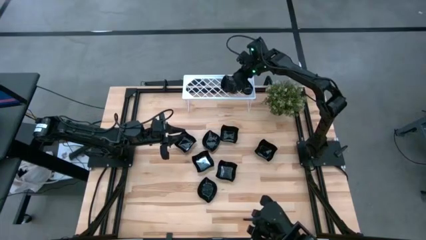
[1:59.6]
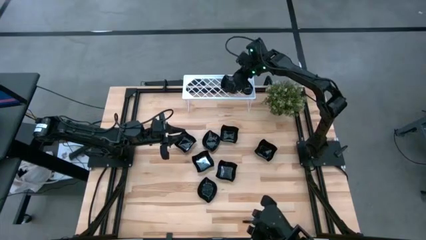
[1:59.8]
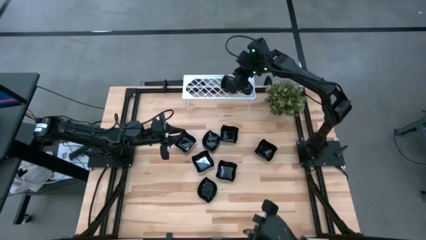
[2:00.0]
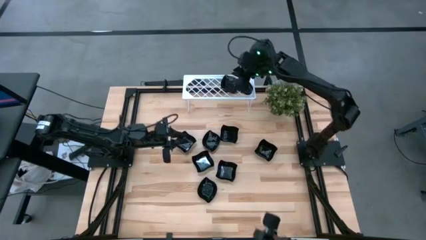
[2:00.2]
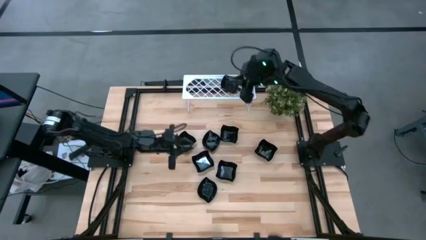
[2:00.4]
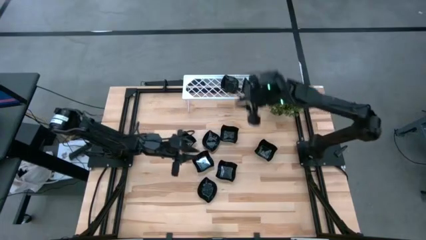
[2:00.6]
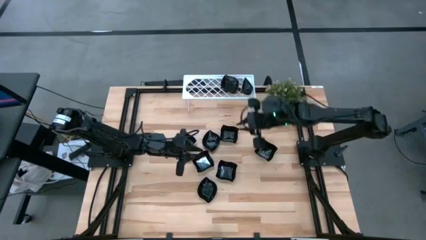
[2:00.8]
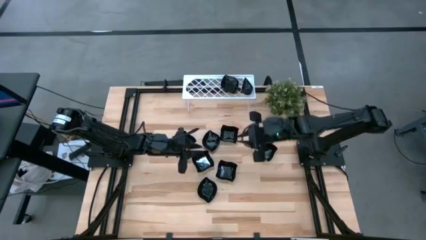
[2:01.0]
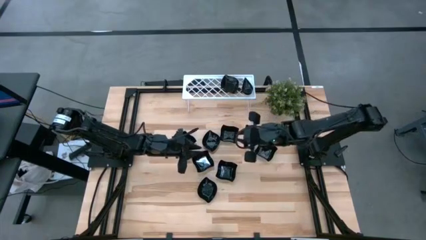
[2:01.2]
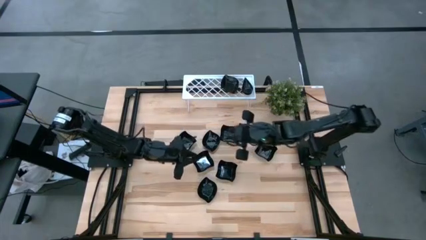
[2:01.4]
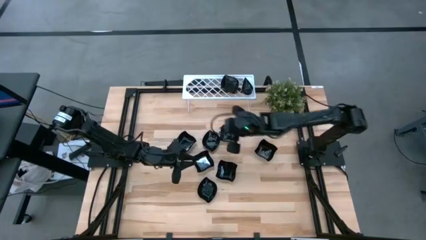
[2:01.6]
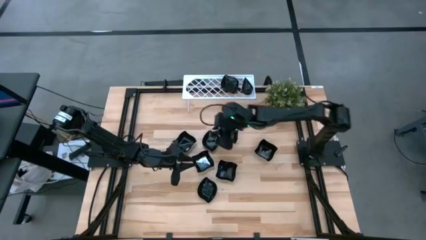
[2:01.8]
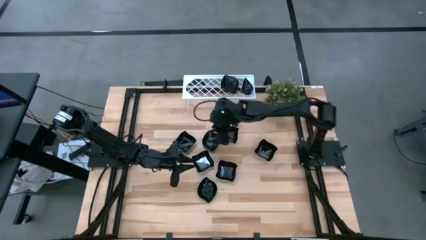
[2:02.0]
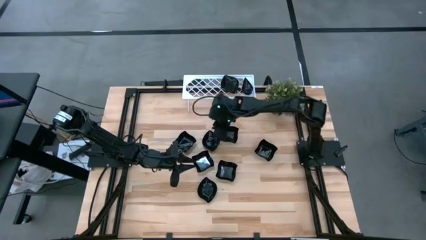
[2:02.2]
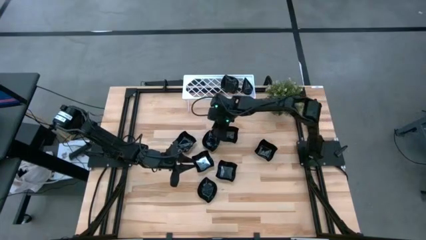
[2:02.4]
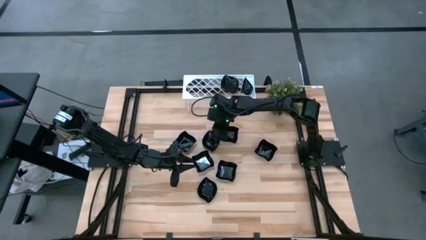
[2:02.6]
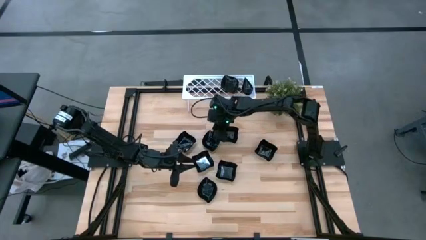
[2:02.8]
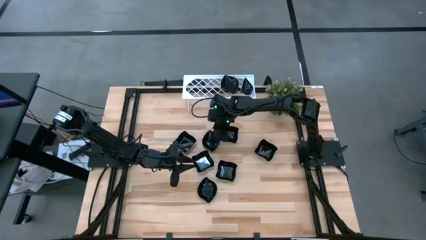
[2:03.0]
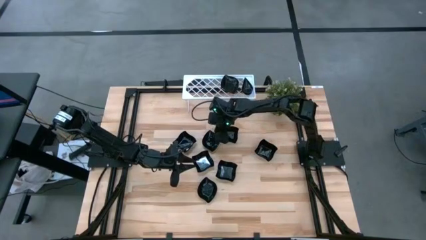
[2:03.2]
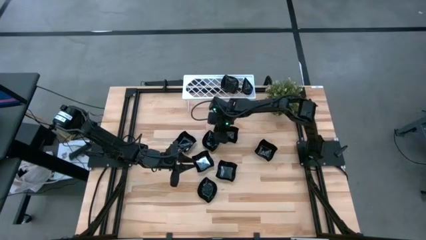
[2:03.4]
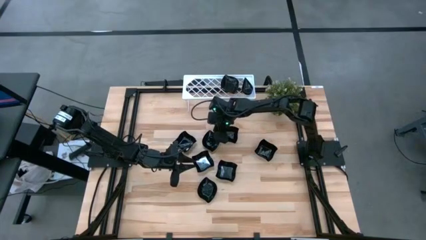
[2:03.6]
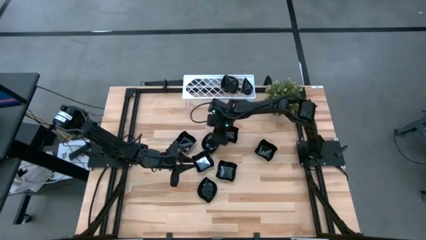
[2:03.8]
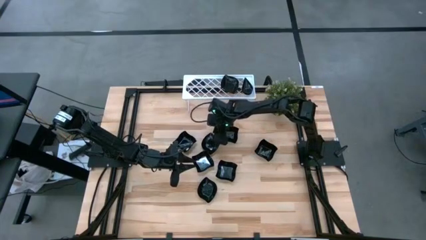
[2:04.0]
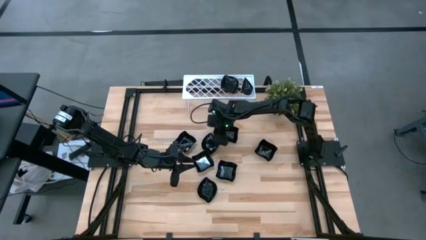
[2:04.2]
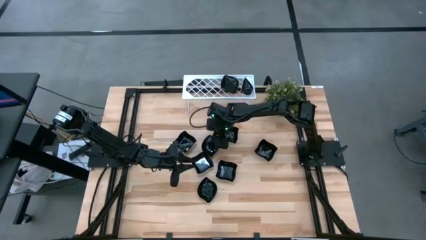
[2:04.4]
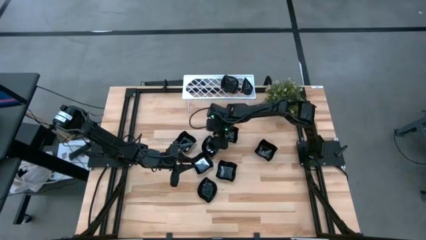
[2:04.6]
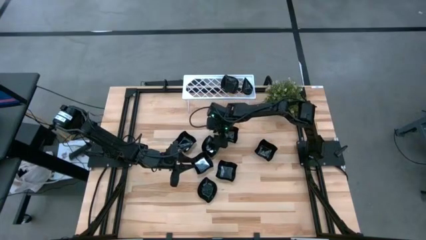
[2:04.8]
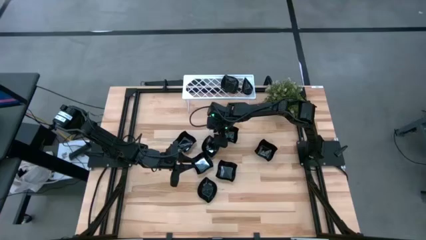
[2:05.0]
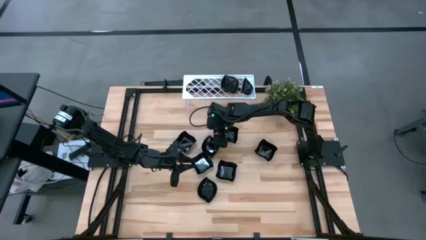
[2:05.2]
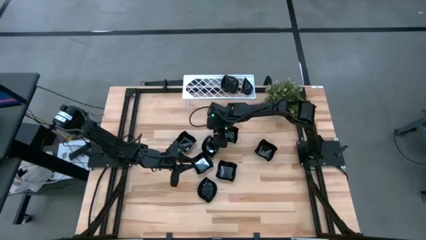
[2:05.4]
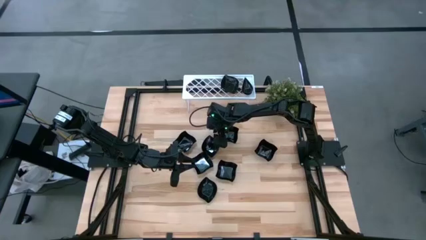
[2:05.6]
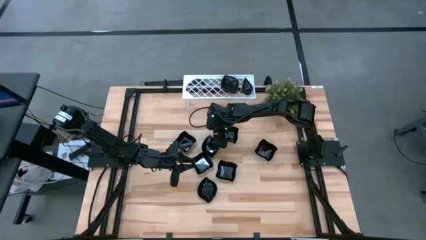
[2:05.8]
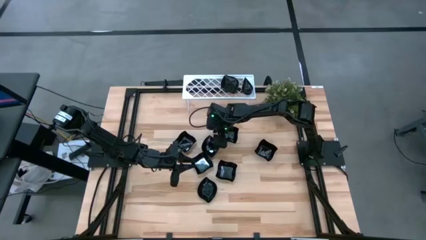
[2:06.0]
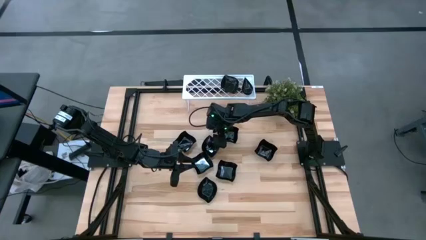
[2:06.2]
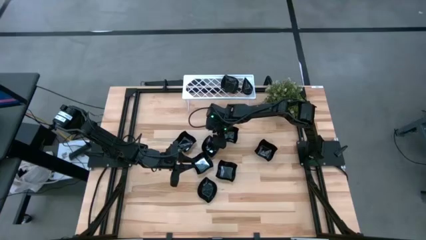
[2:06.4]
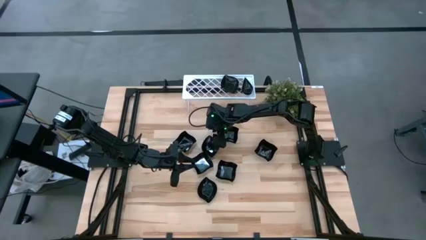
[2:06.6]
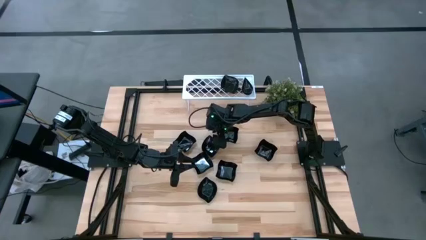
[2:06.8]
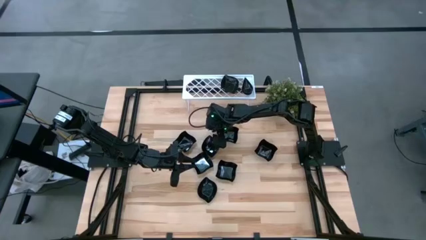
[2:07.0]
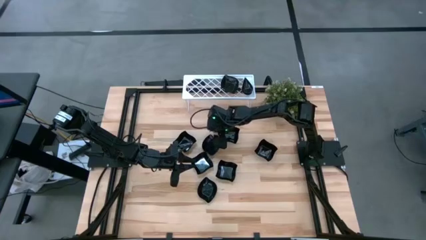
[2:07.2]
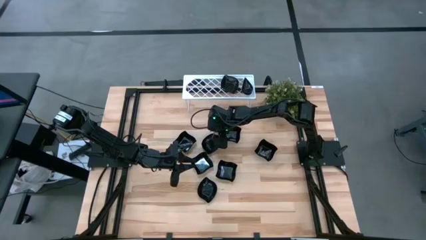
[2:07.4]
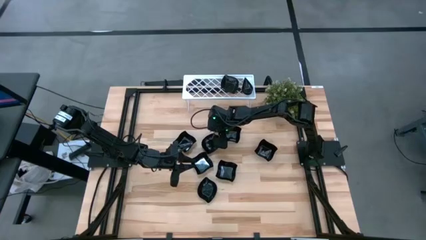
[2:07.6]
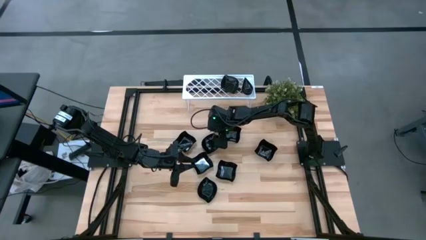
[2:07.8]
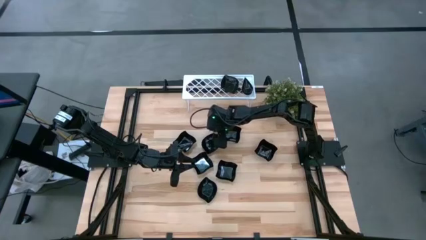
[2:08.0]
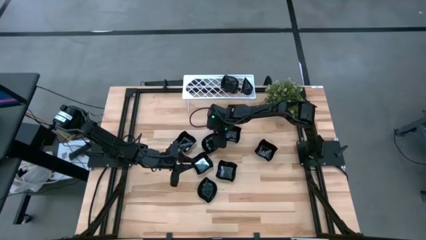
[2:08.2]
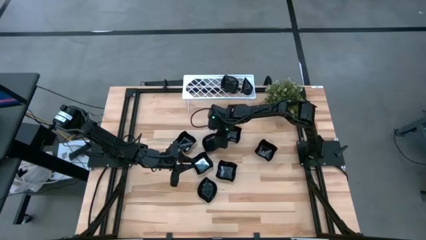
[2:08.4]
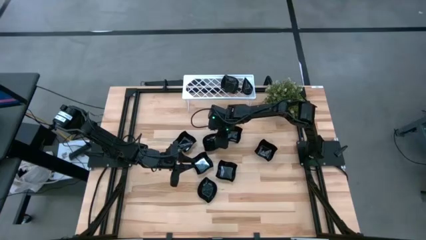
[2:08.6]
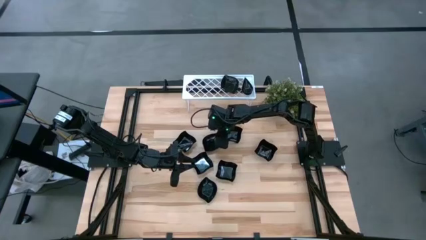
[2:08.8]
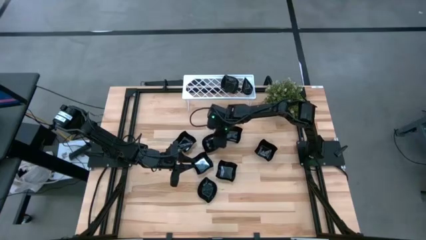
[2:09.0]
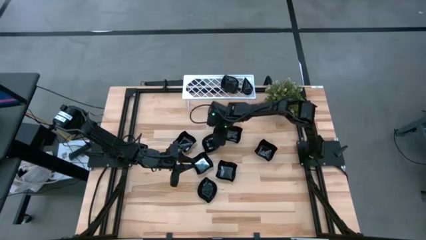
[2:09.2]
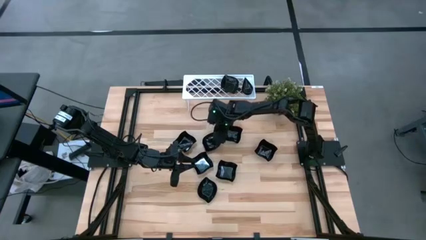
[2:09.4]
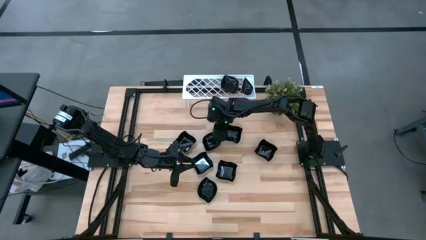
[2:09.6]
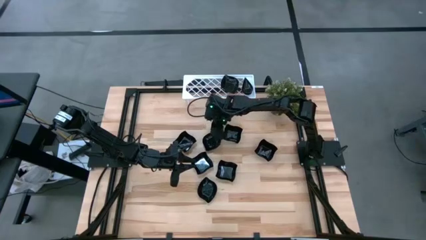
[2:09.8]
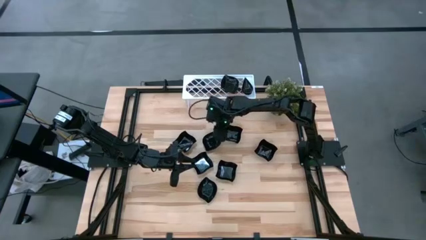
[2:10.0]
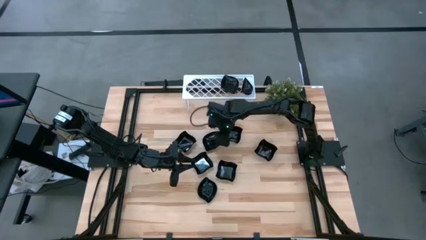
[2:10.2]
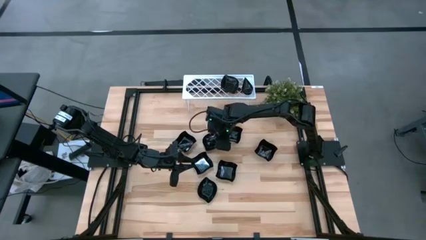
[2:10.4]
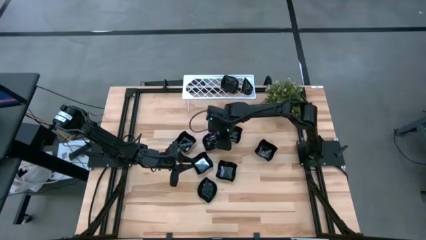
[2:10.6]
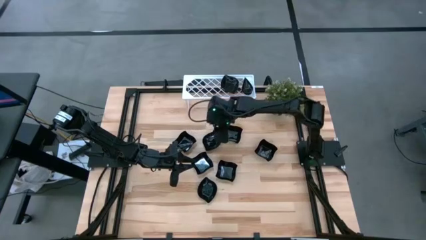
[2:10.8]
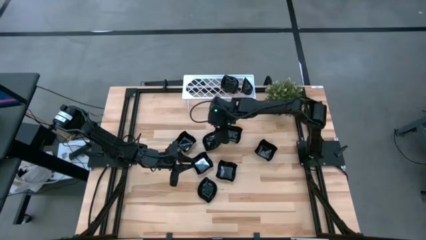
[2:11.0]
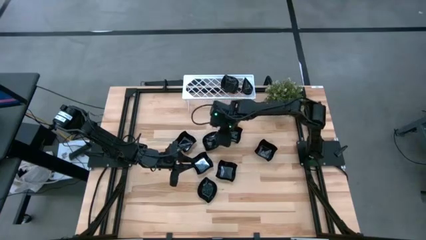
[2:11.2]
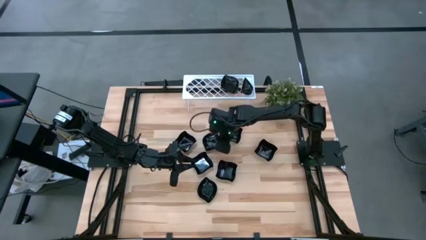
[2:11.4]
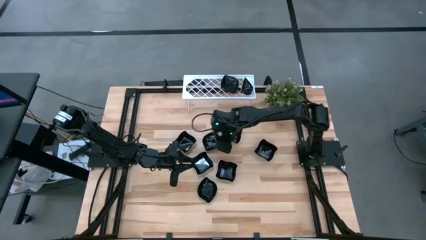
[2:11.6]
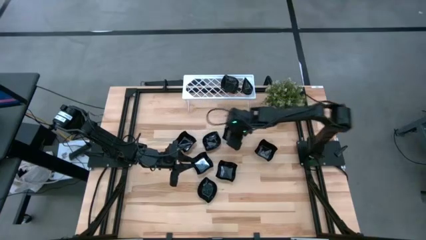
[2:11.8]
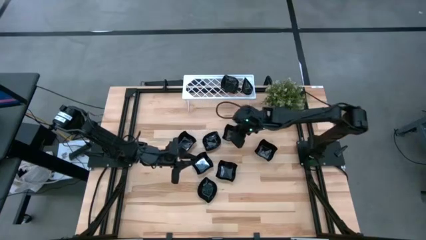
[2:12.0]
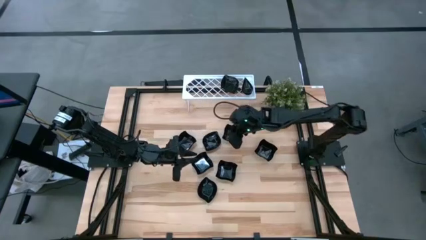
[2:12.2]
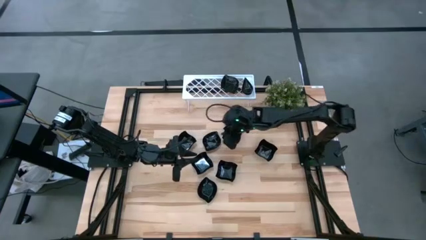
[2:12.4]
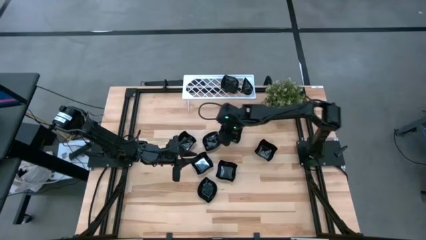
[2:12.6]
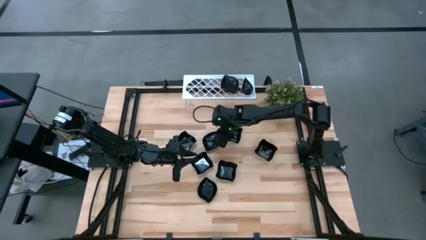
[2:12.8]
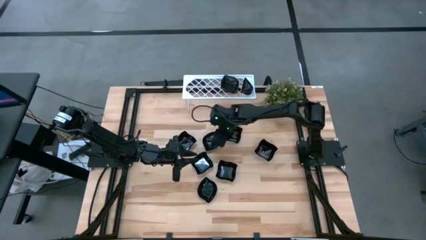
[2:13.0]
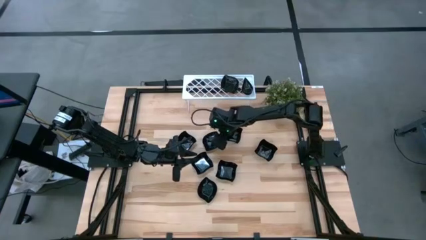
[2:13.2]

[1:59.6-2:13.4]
Task: Pick & Place Mini shaped plates
Stack the leaf shaped plate on top of the leaf shaped plate on the shelf

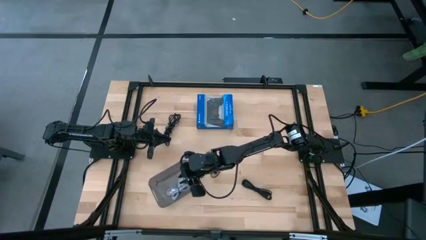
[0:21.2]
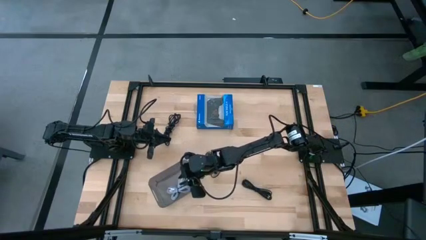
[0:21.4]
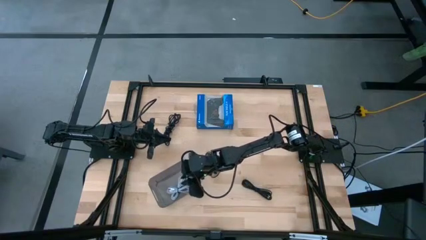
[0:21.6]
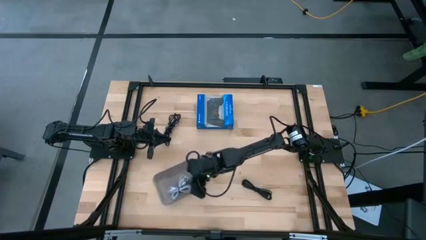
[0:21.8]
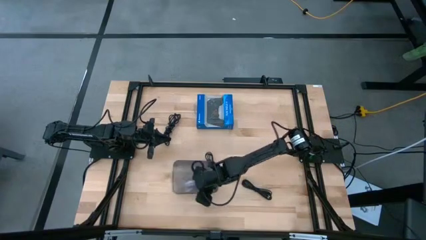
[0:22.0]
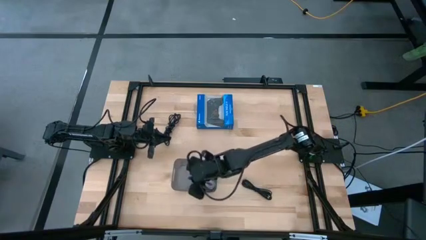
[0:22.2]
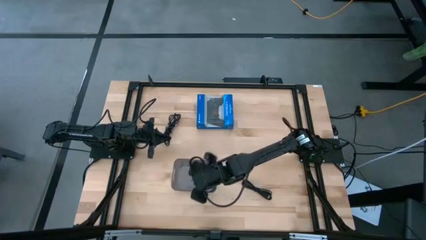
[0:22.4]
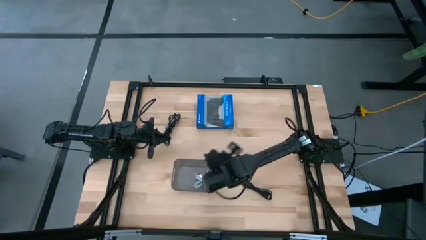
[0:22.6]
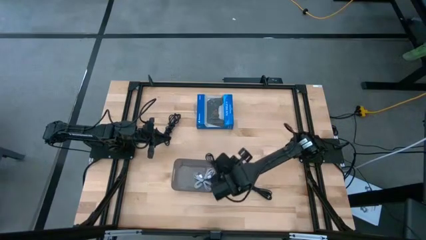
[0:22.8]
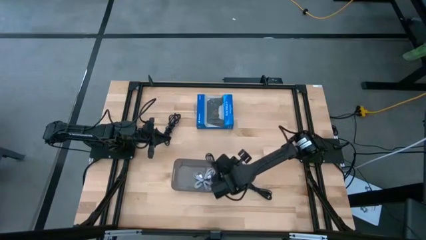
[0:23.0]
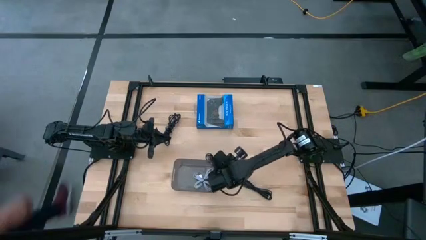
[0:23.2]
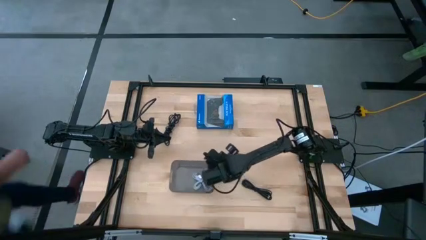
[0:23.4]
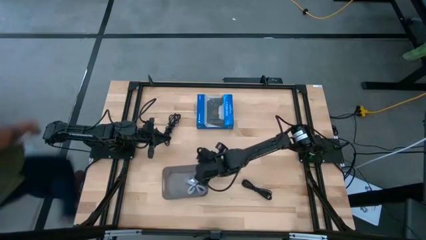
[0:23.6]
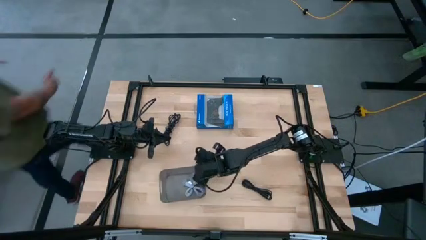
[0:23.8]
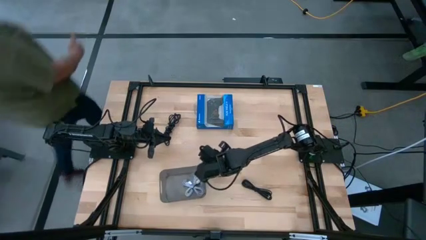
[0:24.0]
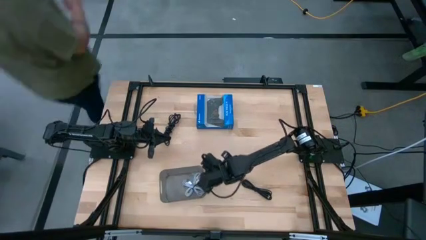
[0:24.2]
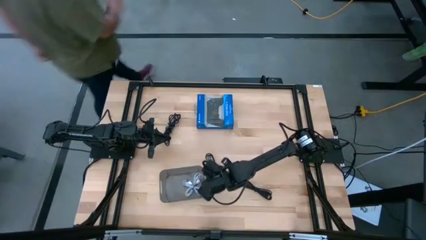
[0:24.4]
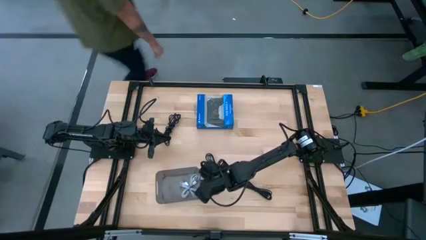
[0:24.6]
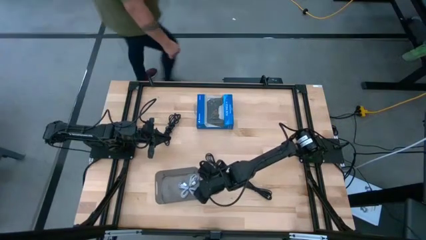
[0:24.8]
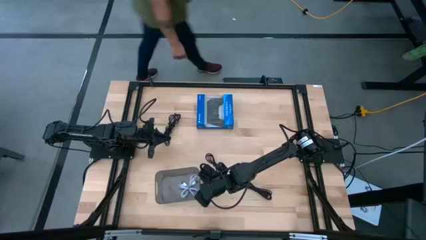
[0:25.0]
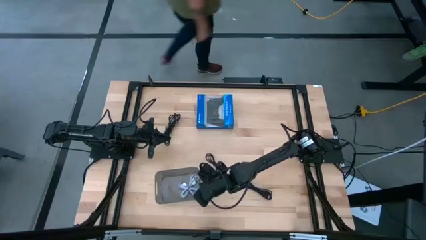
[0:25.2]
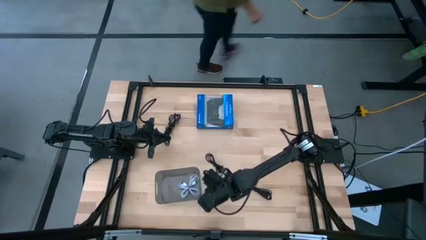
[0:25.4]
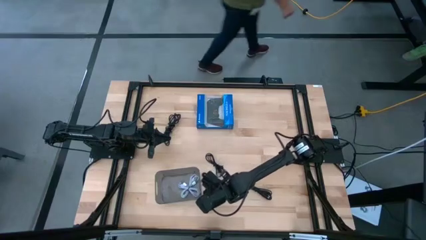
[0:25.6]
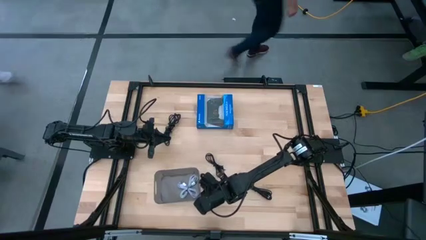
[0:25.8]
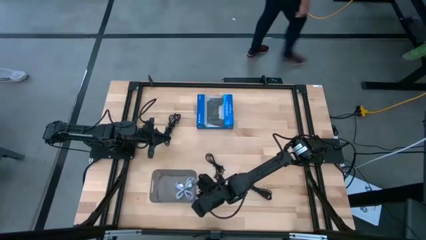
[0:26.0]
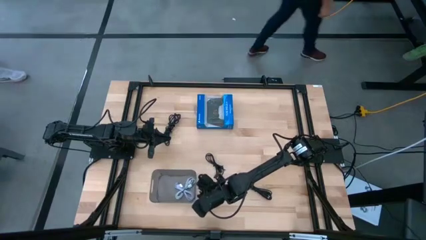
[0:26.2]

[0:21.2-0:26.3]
Task: Pick and place USB-C Cables
Adjust the black bin
